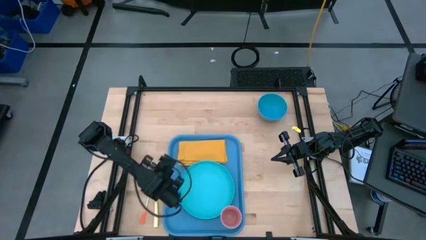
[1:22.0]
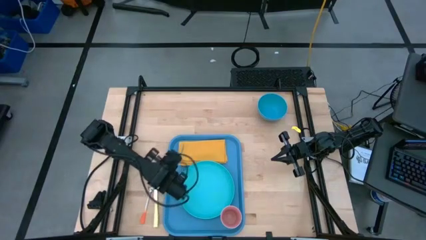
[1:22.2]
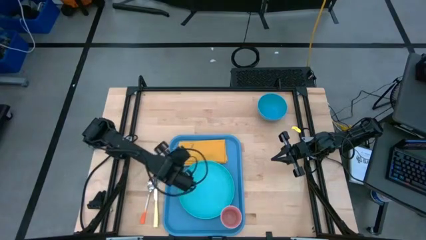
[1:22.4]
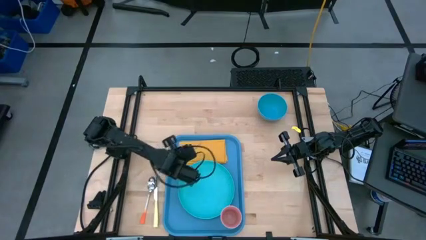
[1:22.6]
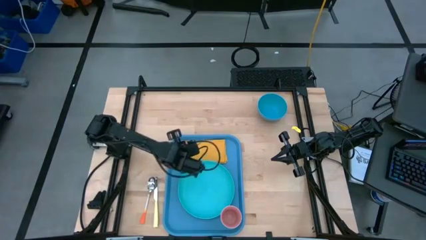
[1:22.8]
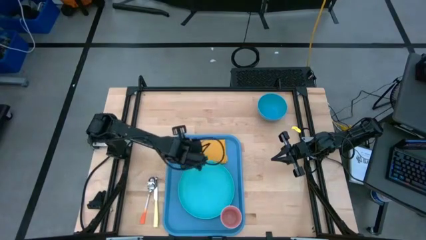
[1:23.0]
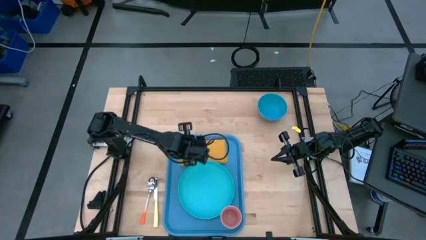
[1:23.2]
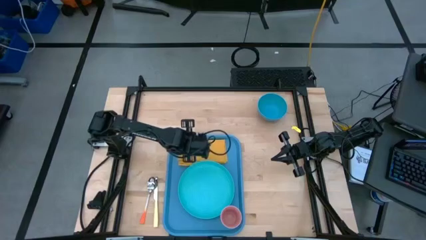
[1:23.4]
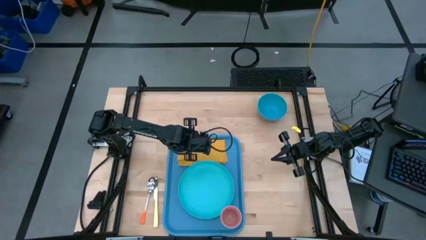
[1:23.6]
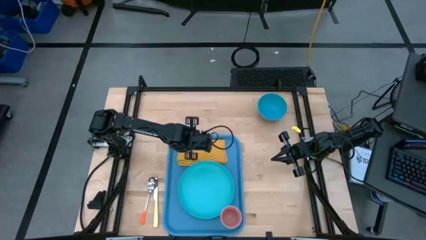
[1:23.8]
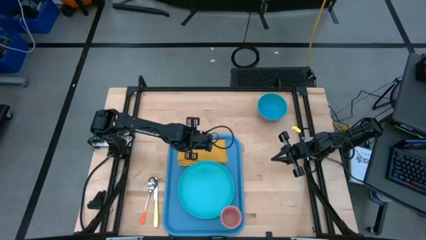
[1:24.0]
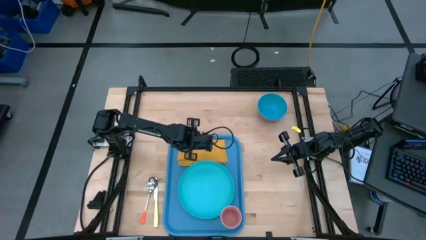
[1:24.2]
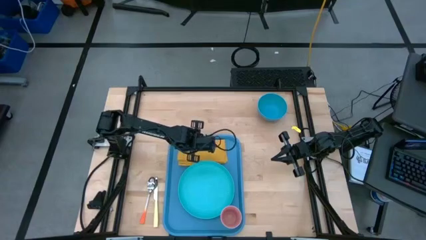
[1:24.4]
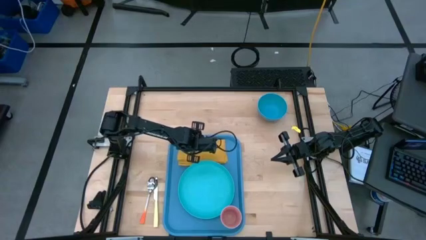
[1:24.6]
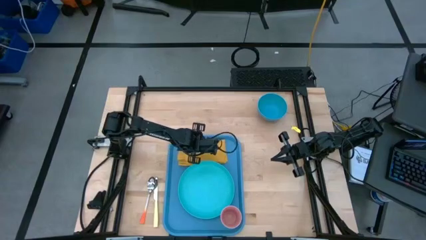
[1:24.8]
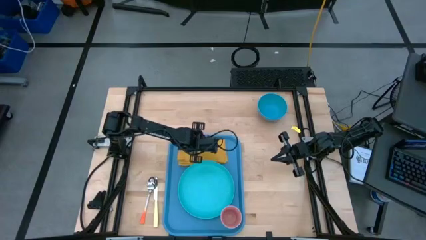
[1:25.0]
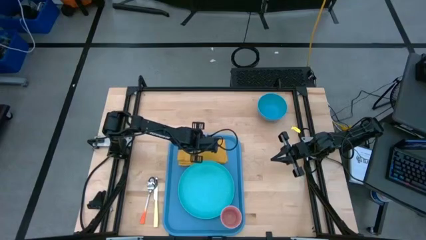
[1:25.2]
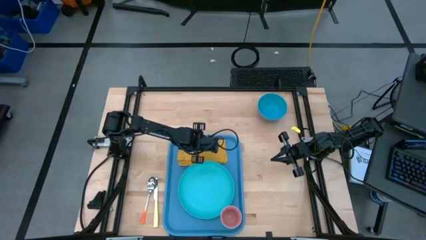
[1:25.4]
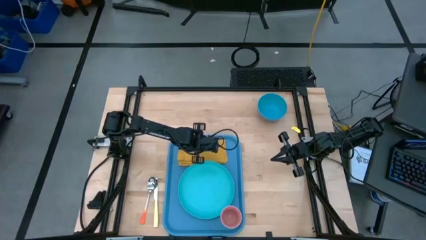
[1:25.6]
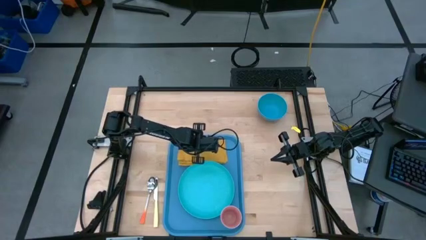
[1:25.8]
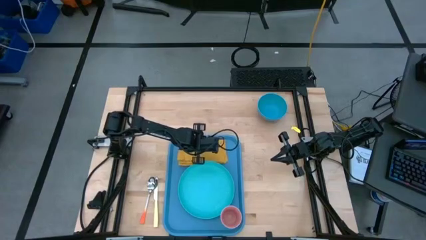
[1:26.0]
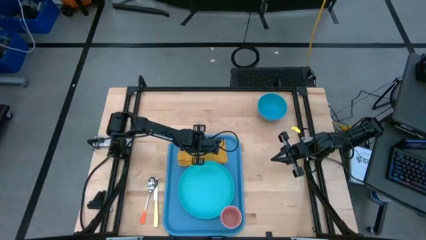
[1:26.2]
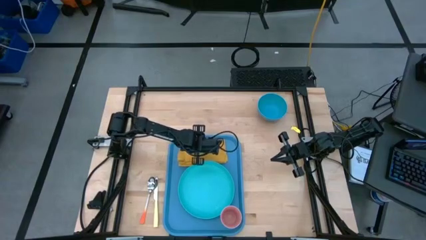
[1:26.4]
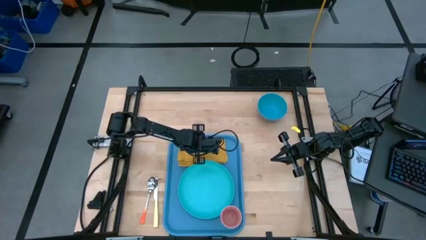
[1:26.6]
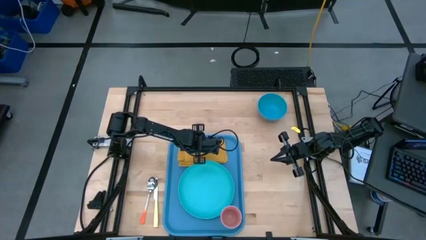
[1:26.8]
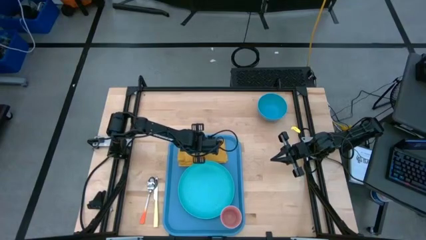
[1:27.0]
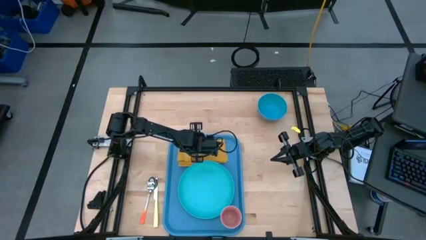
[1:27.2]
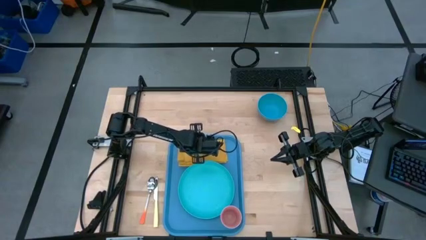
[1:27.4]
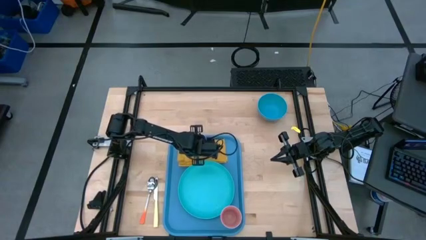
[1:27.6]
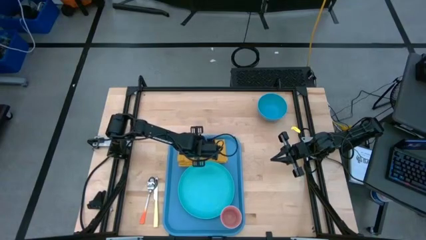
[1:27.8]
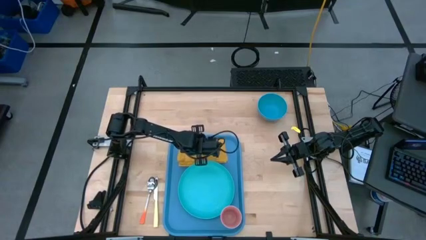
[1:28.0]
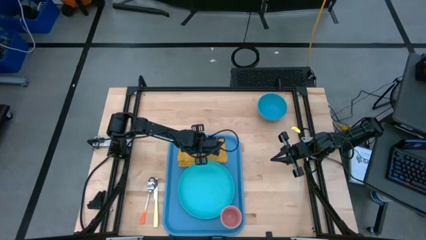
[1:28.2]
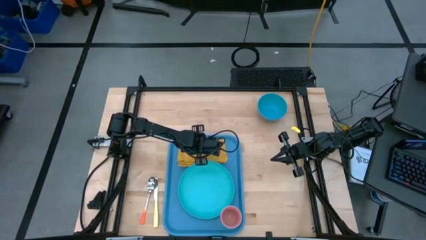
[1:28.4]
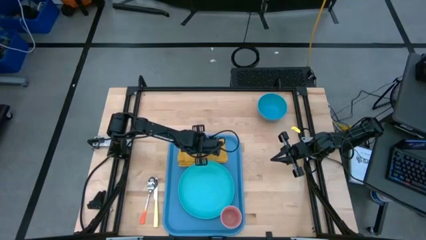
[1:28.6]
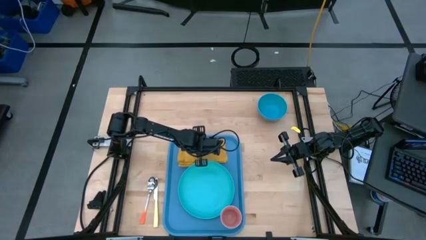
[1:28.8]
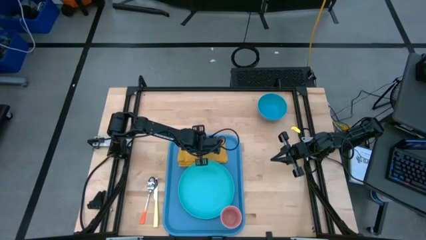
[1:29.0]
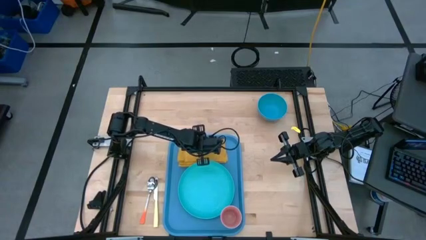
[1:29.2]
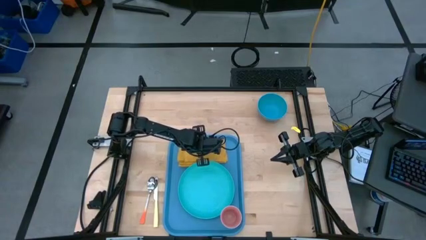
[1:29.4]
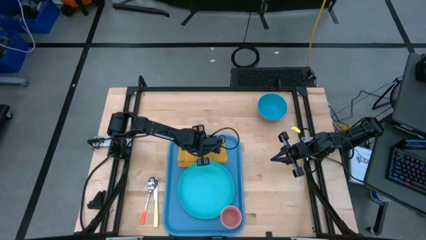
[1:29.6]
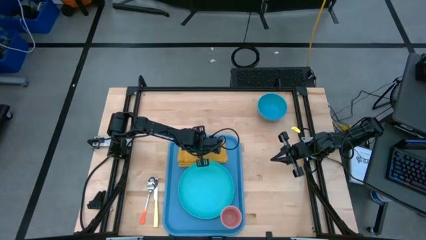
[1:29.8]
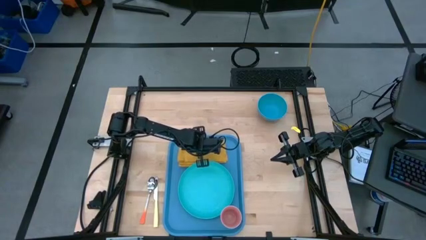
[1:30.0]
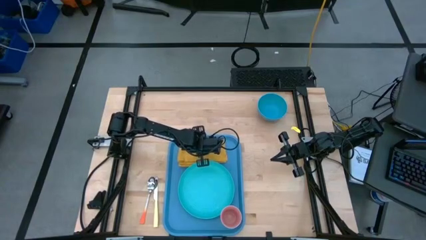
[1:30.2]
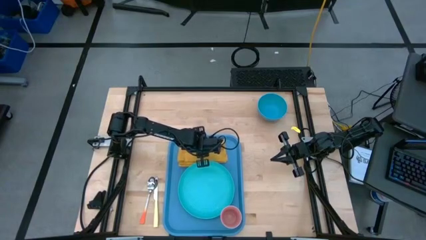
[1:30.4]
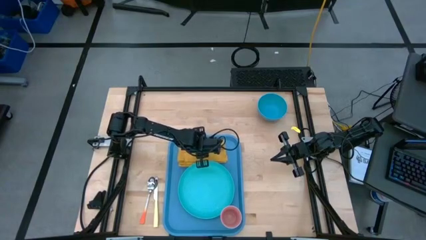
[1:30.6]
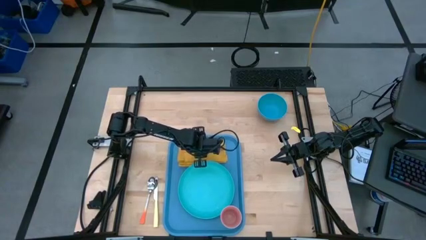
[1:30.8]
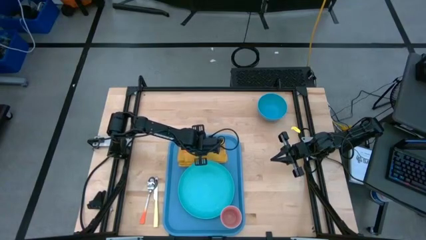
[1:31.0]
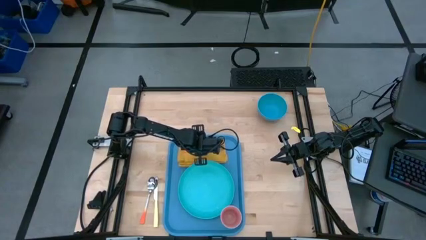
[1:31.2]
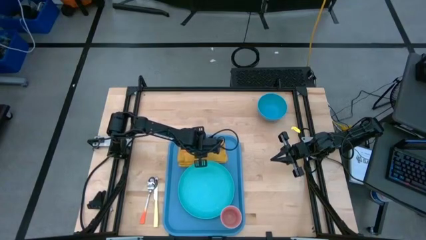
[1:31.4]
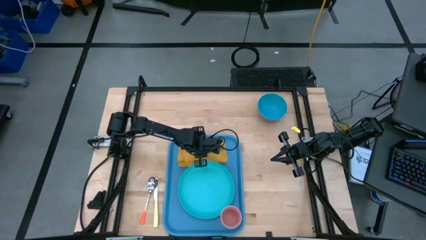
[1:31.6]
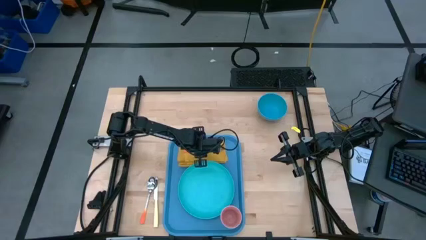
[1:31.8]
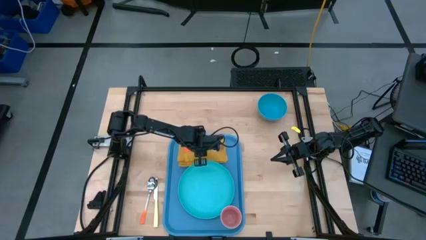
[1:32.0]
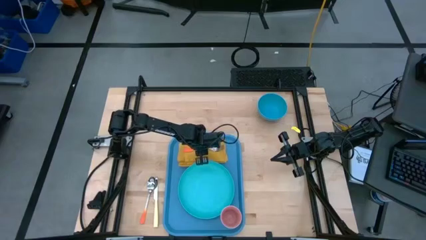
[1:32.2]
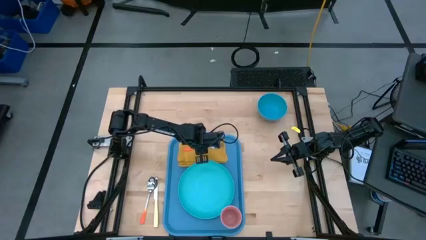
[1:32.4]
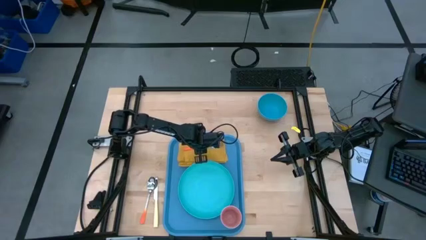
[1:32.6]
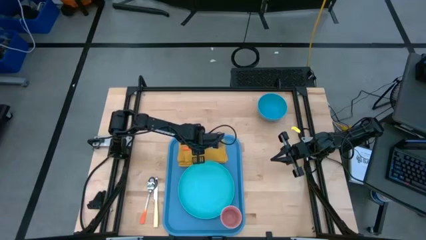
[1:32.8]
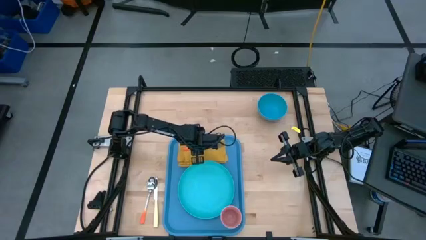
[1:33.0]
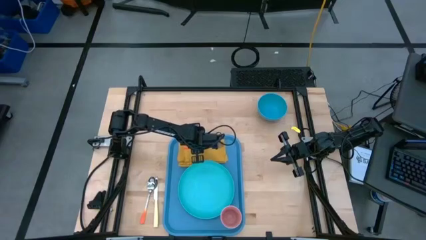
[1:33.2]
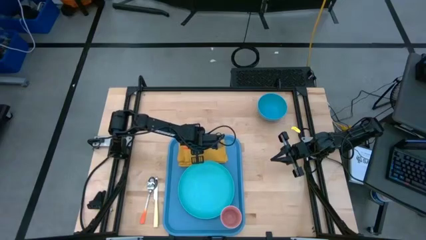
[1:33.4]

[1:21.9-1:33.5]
Task: Set up tray
Put the orange fork to the left on the yellow napkin on the blue serving tray

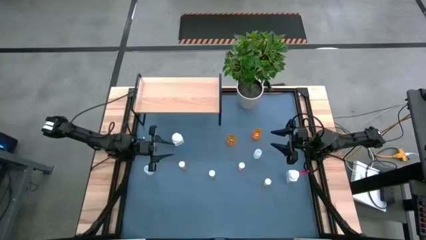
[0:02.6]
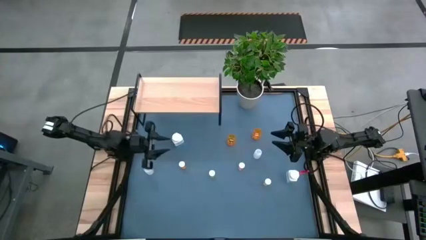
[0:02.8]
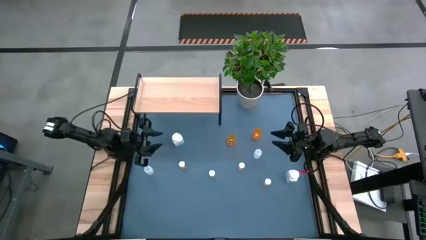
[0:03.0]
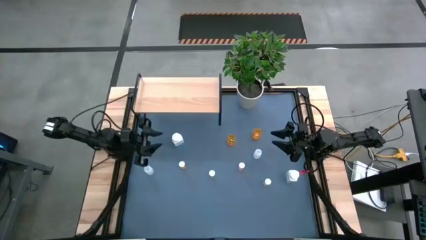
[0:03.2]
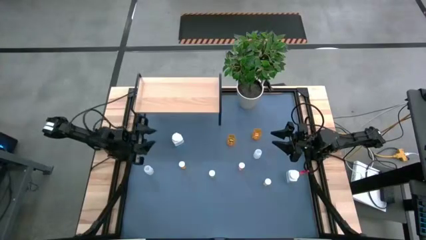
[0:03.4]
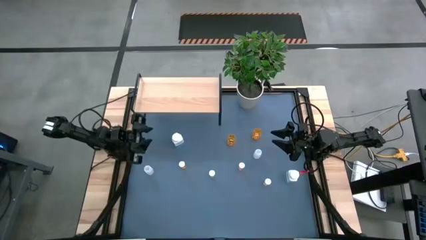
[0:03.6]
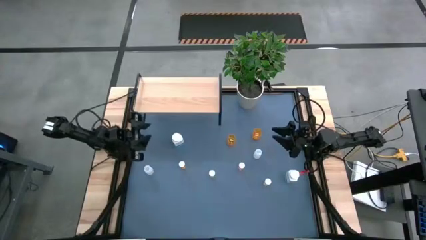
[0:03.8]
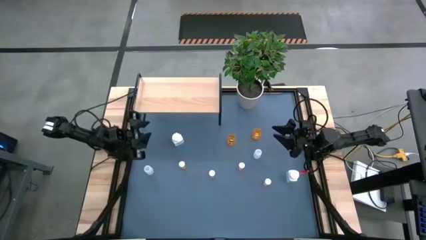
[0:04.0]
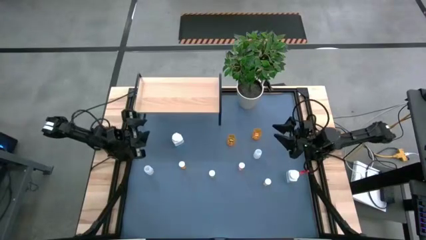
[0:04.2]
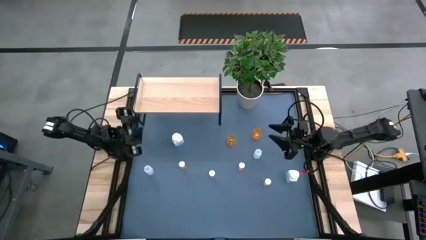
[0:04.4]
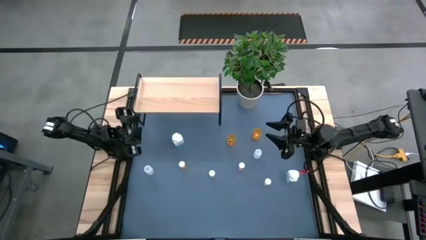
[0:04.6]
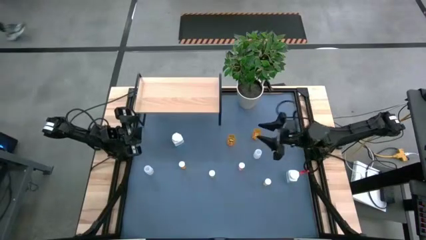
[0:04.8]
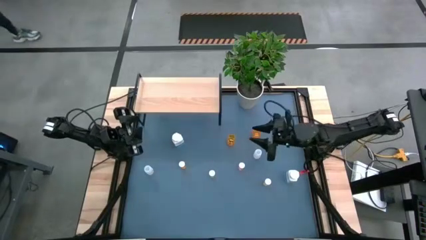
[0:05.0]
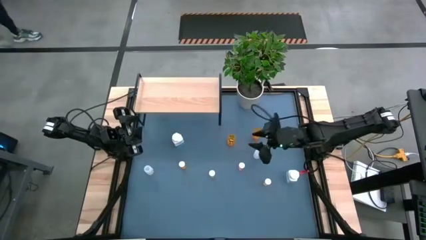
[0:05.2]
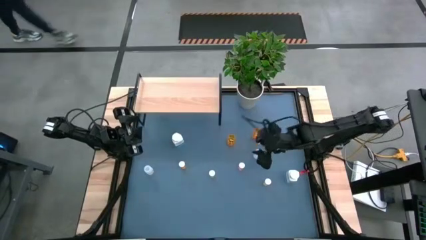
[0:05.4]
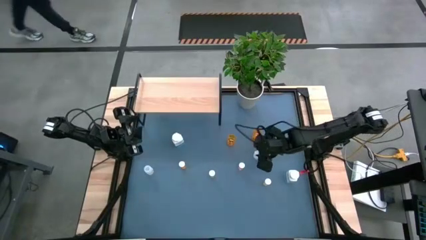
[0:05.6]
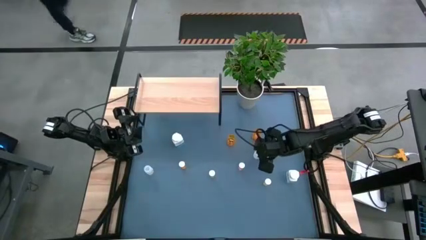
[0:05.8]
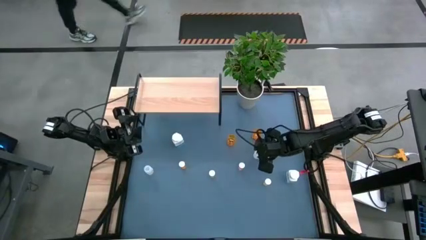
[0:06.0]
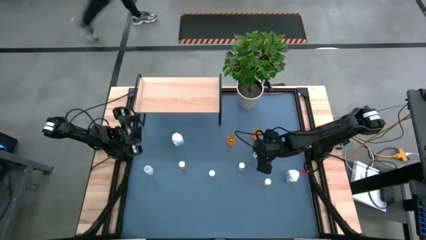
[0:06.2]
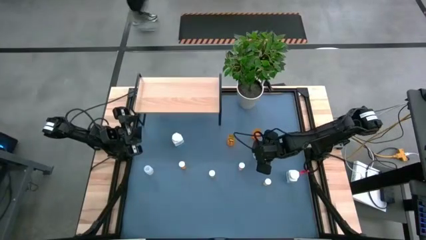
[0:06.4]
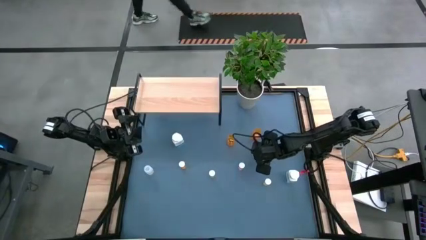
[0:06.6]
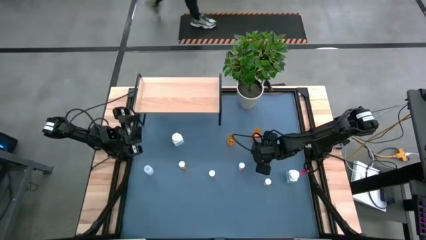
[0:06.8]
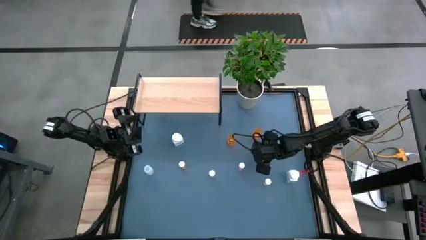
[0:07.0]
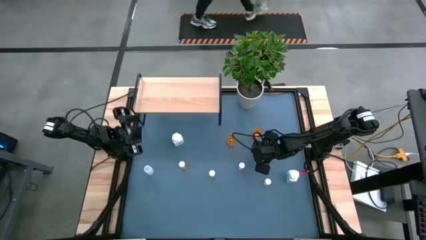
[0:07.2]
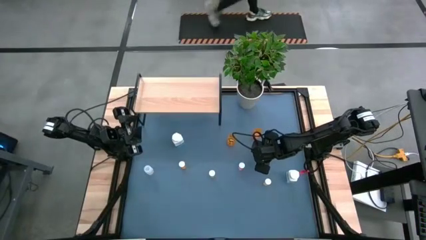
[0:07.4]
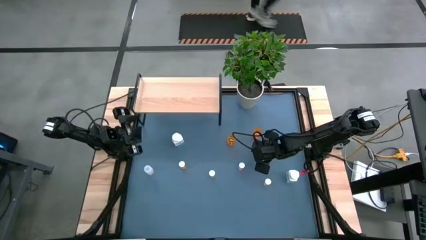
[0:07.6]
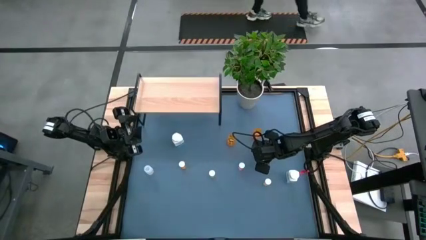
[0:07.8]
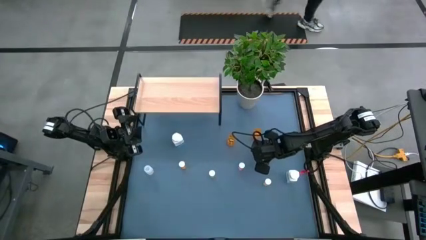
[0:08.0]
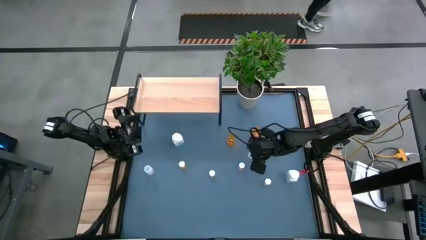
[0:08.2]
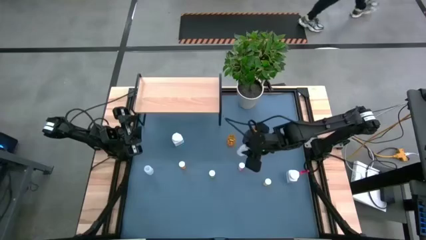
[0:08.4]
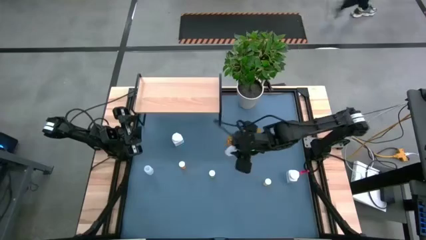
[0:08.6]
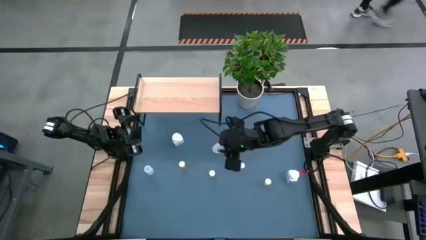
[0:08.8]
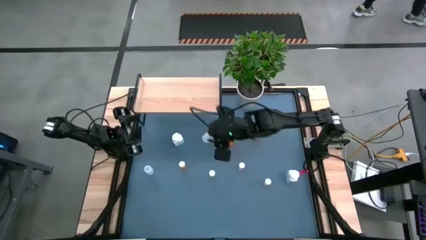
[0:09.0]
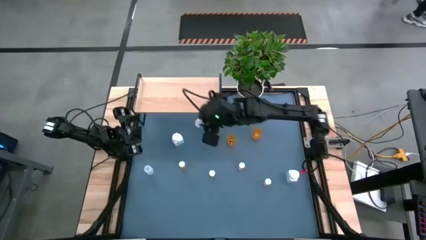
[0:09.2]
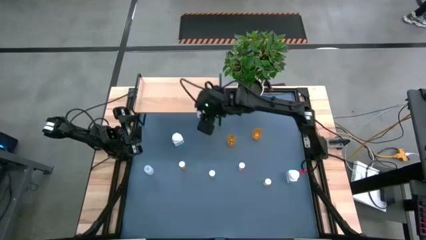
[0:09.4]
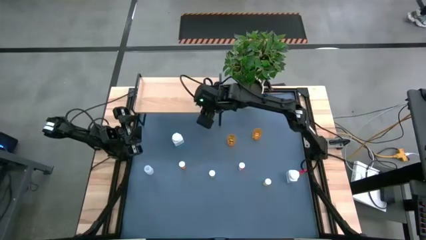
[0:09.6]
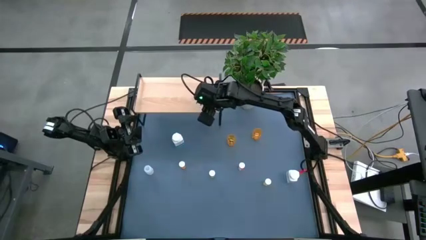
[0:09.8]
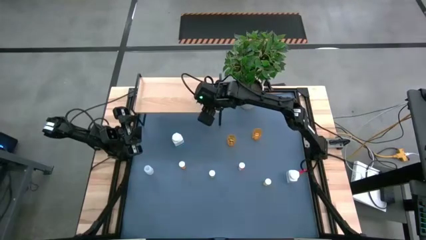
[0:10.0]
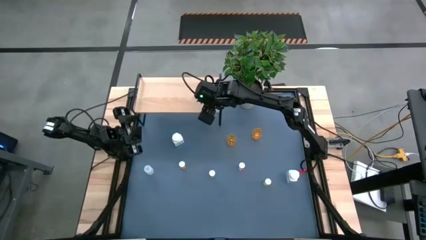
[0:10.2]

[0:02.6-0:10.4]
Task: Pick and place medicine bottles onto shelf by color
Put the right transparent pill bottle on the shelf
